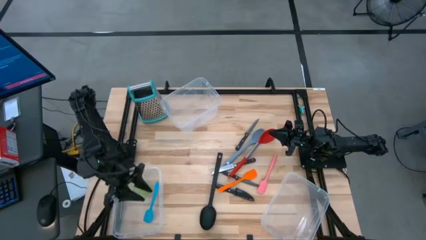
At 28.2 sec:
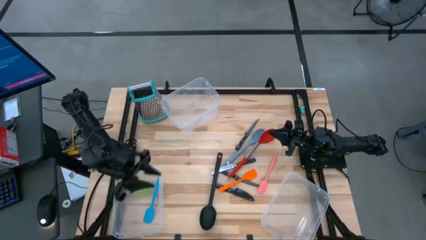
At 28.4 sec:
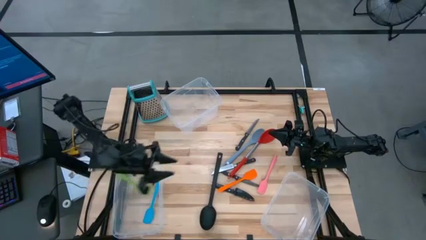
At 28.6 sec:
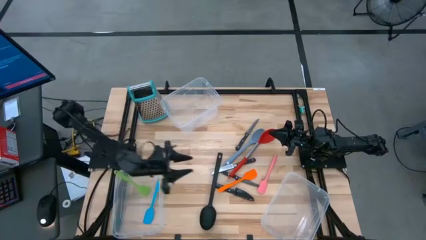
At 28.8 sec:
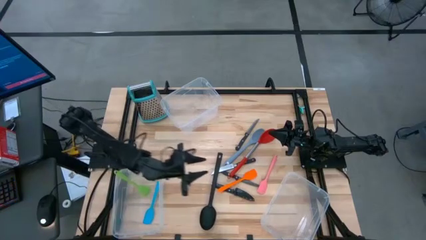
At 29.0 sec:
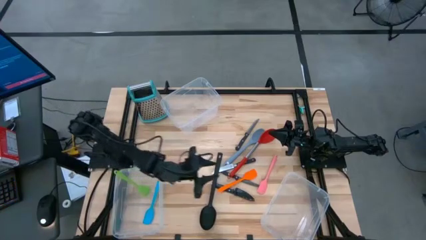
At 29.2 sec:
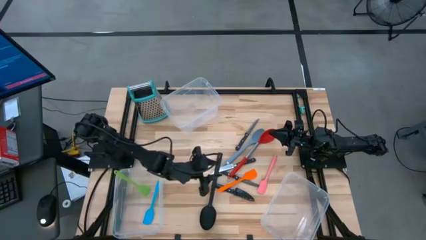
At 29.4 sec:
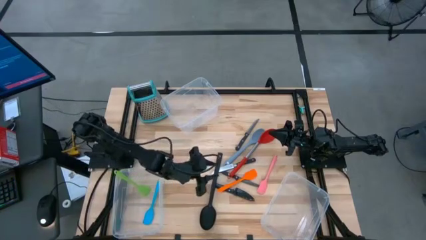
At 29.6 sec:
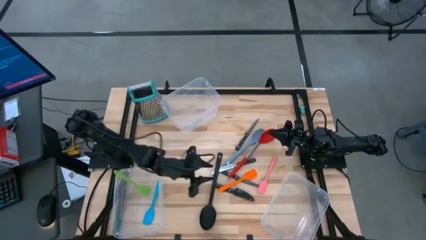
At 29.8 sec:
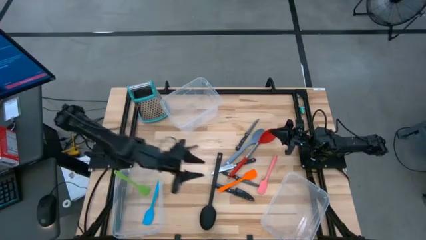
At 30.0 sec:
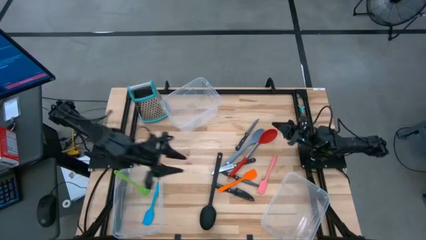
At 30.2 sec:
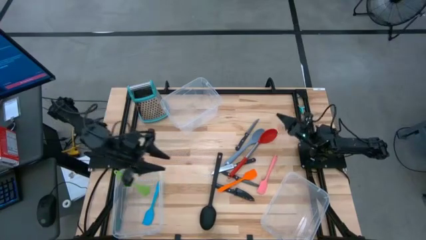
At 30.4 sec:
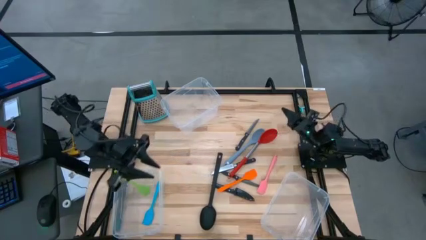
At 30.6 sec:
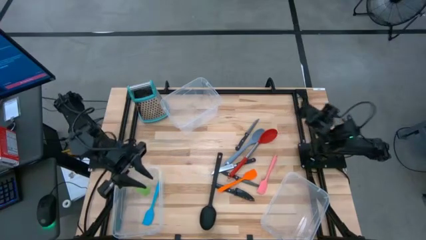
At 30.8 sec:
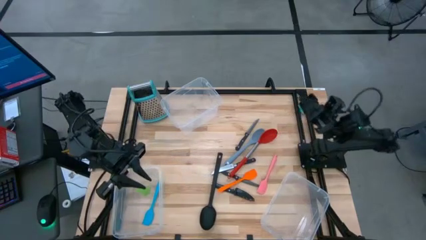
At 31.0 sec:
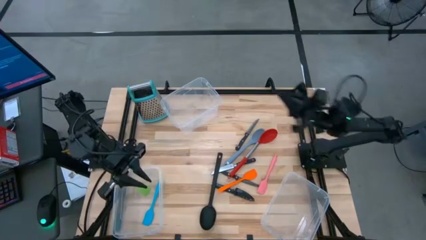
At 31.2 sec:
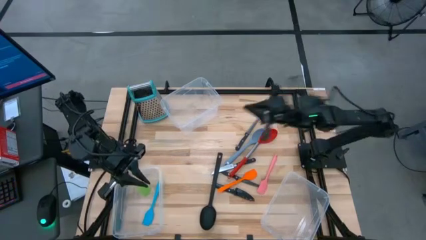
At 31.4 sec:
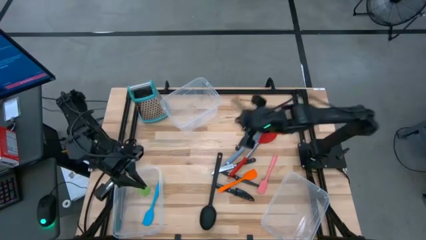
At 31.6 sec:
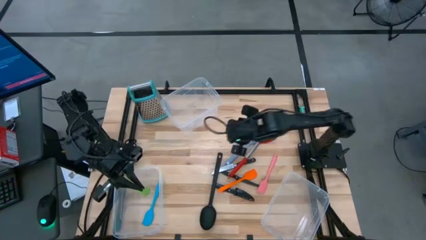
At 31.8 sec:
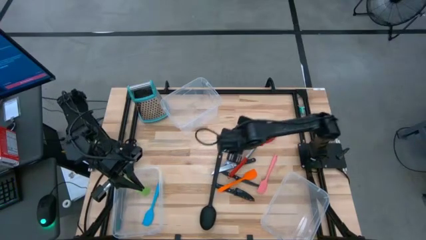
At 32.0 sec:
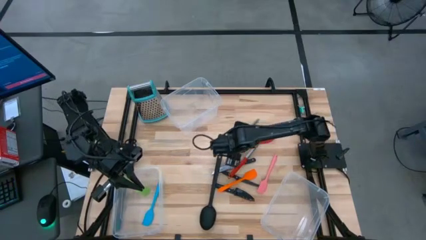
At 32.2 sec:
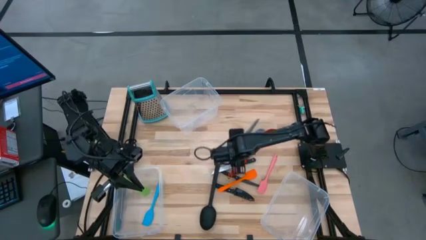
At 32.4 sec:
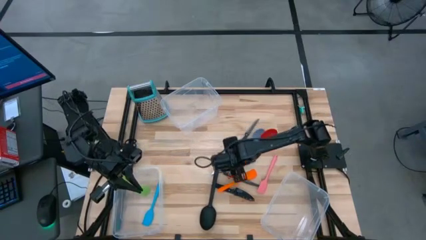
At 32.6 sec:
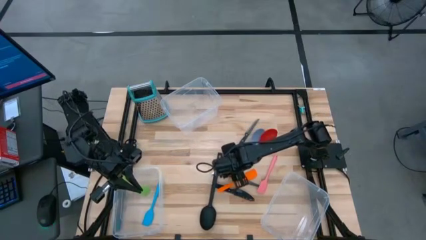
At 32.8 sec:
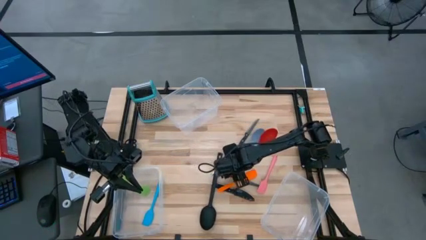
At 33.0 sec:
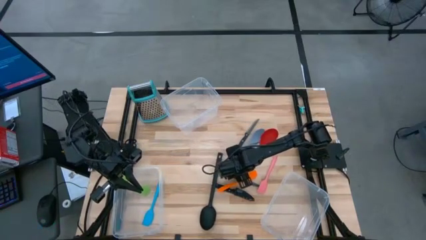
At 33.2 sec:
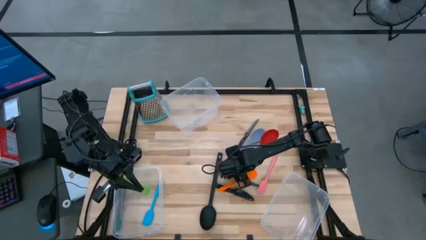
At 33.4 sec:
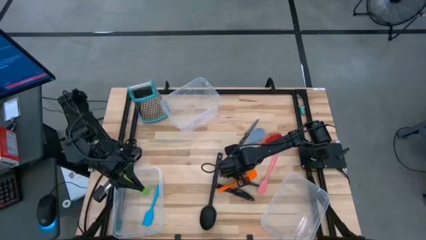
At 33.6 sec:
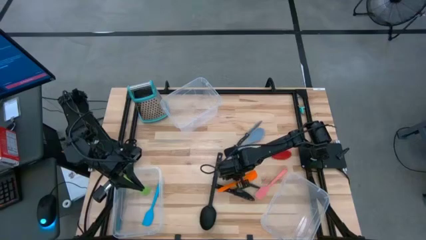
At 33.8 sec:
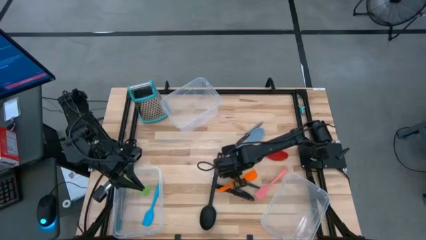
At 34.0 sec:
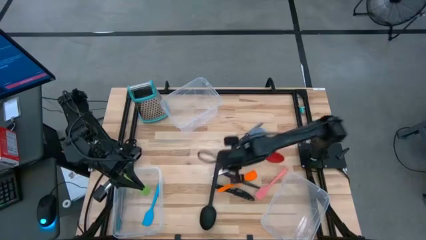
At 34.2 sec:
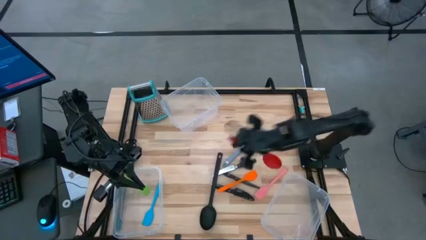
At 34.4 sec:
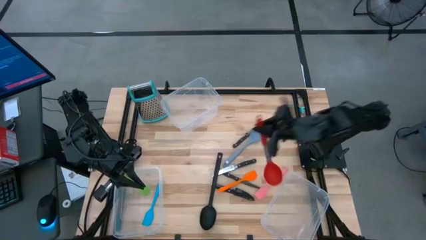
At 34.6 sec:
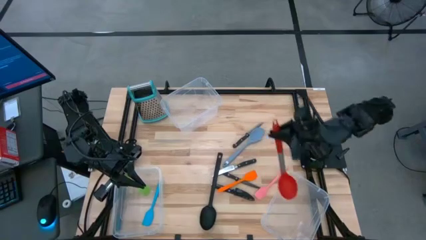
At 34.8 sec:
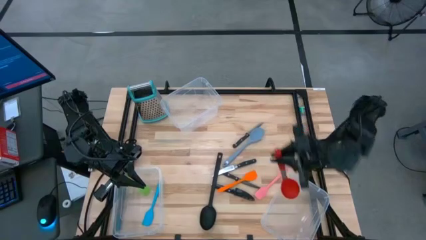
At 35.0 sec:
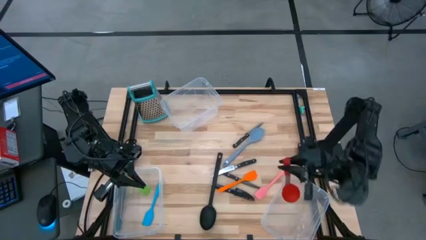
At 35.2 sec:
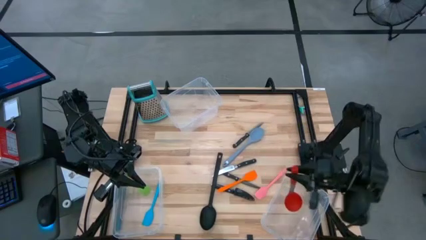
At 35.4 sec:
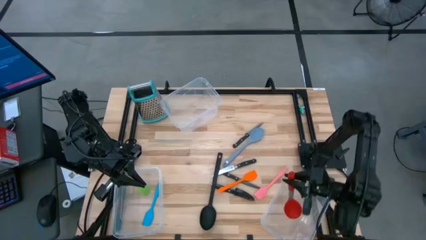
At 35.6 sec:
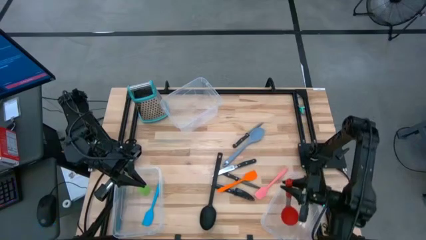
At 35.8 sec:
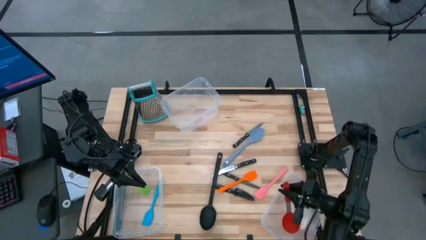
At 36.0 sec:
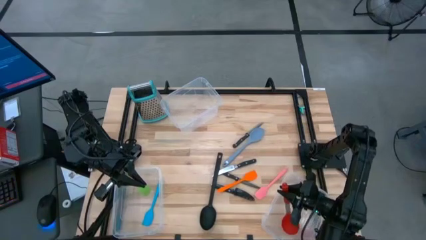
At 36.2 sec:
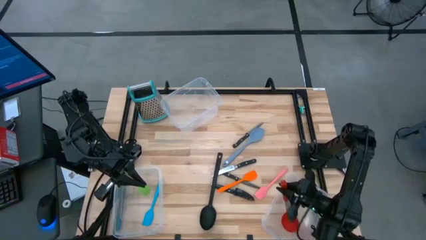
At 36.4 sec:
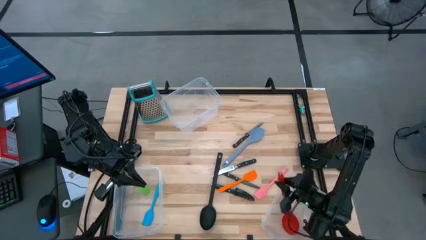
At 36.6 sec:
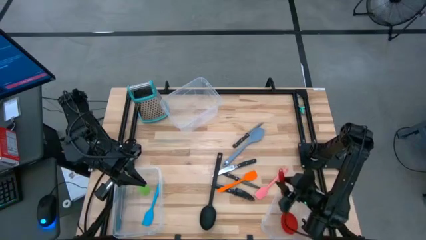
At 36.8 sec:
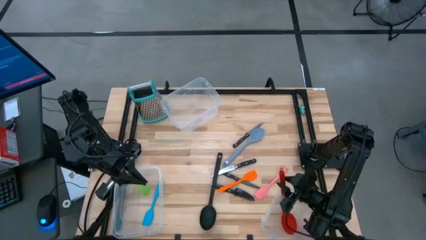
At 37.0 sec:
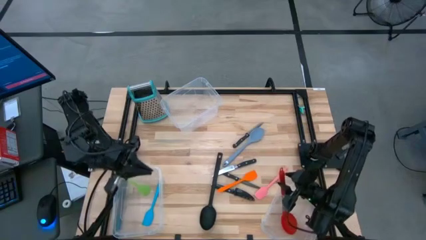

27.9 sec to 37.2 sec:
Task: Pick & Place Kitchen Items
Put the red serving spoon into the bottom right transparent bin

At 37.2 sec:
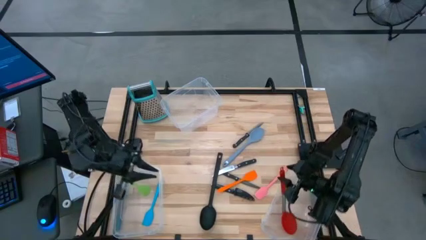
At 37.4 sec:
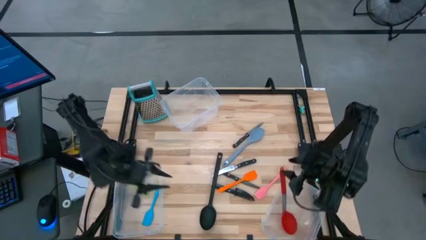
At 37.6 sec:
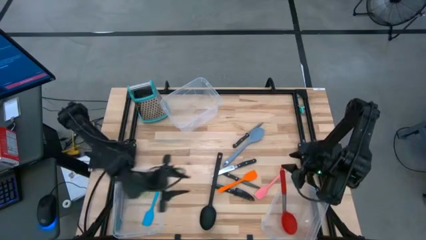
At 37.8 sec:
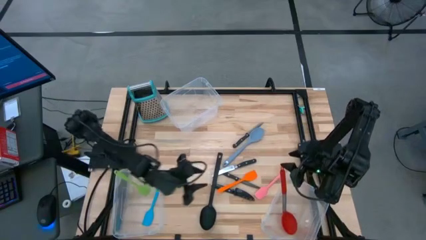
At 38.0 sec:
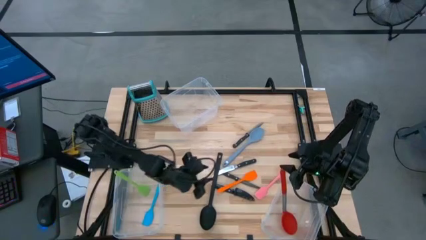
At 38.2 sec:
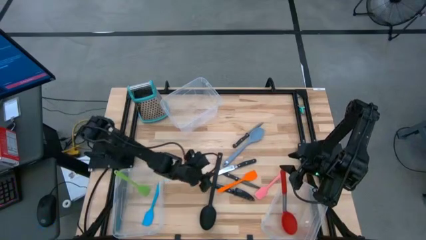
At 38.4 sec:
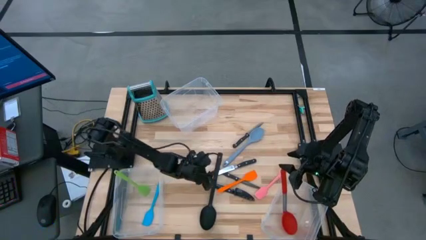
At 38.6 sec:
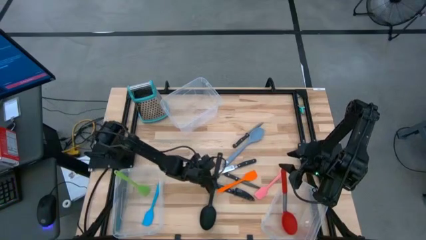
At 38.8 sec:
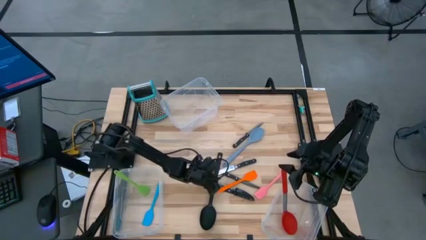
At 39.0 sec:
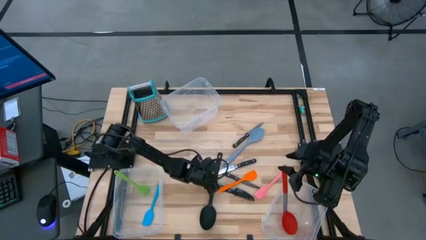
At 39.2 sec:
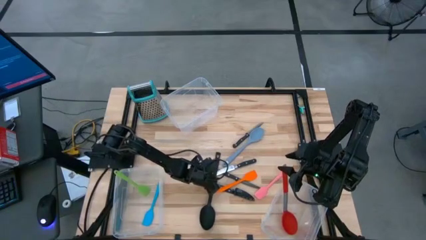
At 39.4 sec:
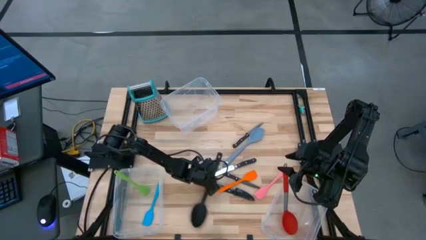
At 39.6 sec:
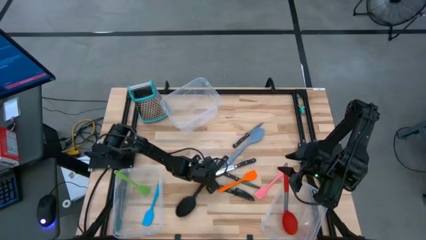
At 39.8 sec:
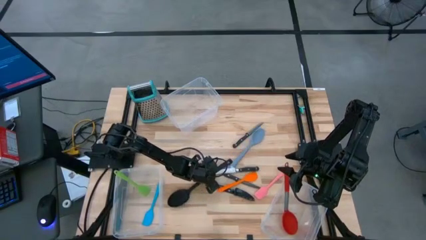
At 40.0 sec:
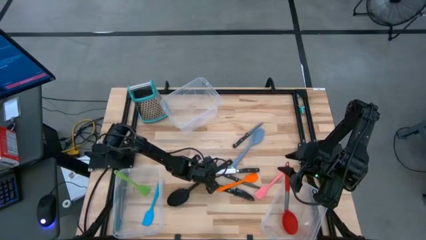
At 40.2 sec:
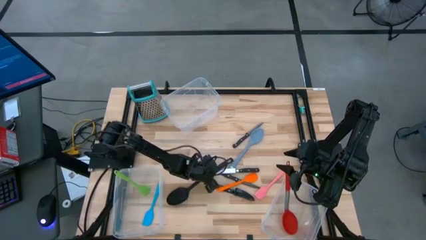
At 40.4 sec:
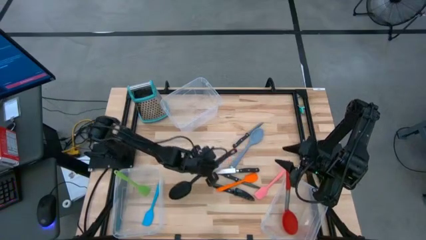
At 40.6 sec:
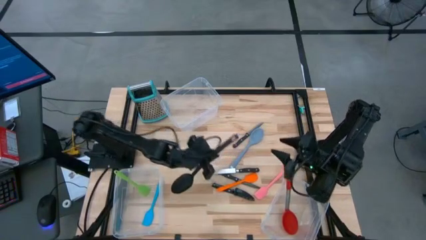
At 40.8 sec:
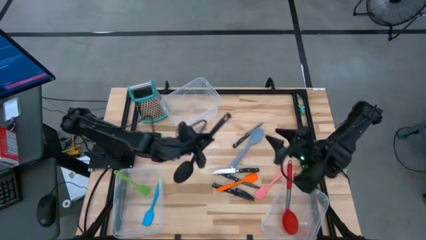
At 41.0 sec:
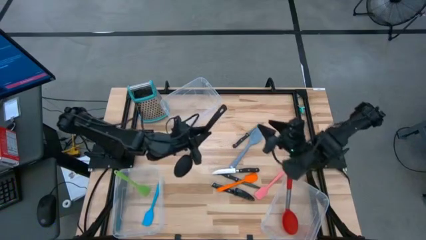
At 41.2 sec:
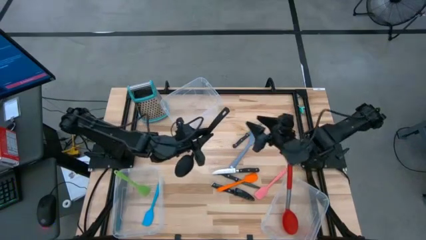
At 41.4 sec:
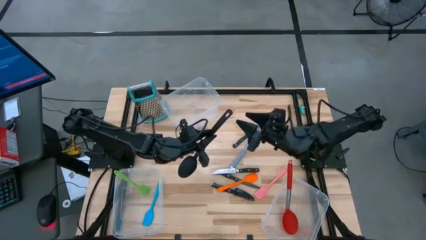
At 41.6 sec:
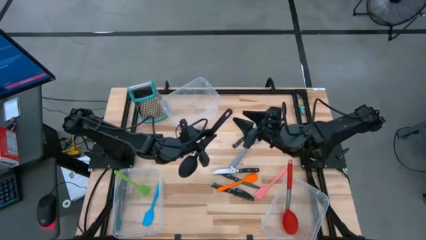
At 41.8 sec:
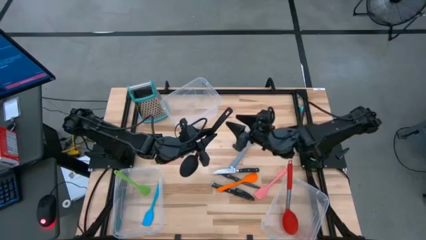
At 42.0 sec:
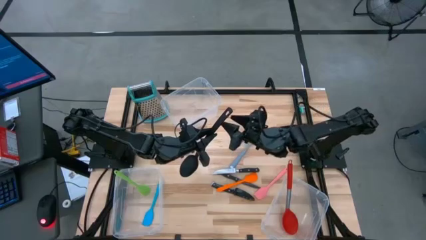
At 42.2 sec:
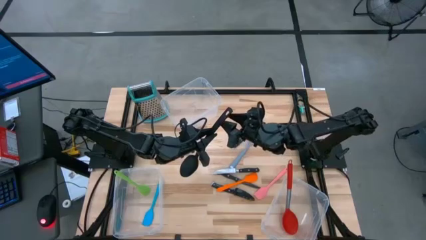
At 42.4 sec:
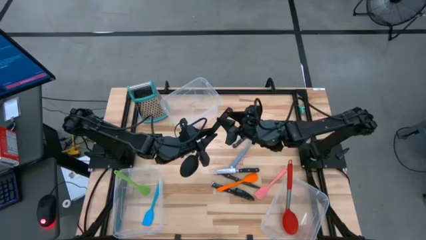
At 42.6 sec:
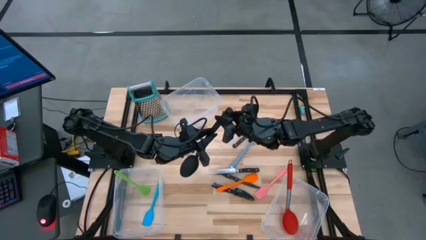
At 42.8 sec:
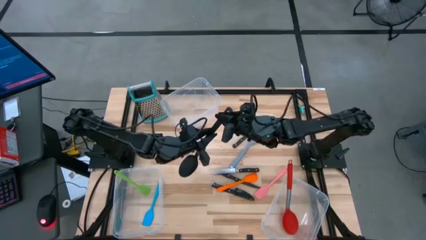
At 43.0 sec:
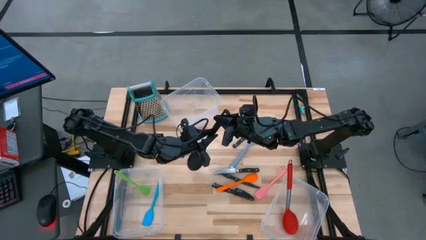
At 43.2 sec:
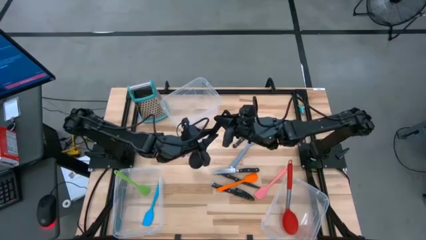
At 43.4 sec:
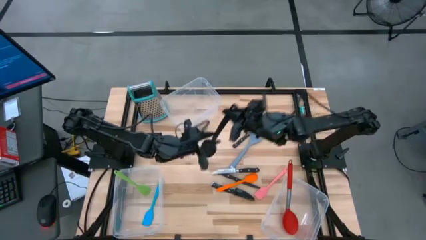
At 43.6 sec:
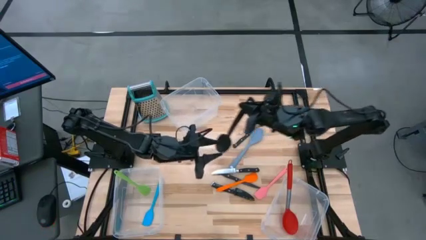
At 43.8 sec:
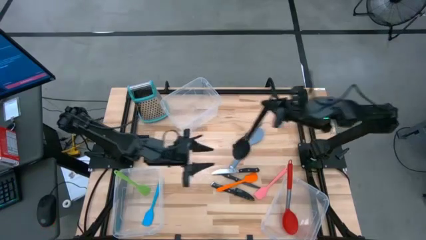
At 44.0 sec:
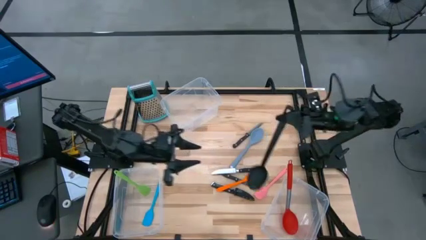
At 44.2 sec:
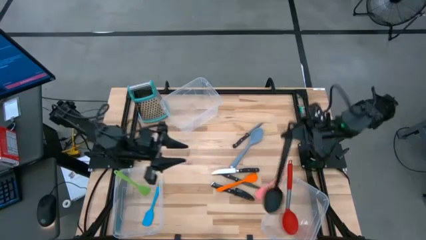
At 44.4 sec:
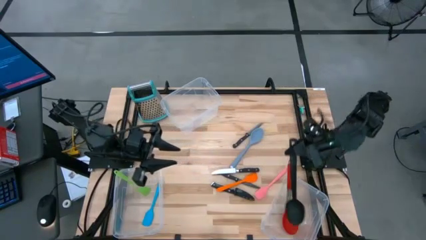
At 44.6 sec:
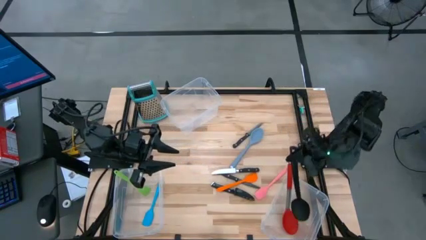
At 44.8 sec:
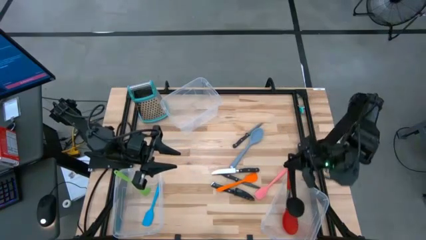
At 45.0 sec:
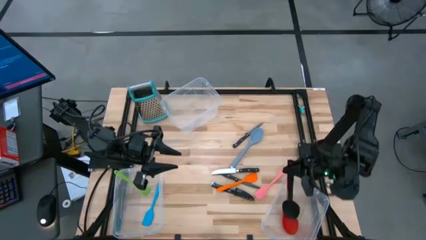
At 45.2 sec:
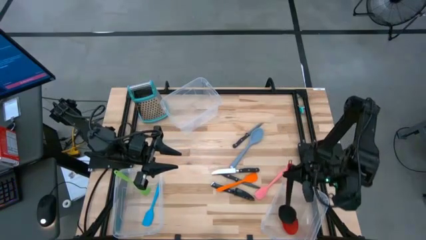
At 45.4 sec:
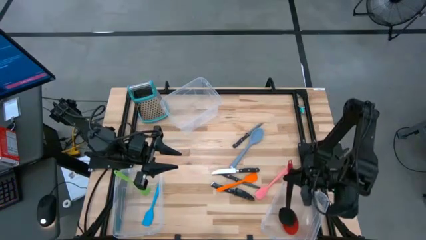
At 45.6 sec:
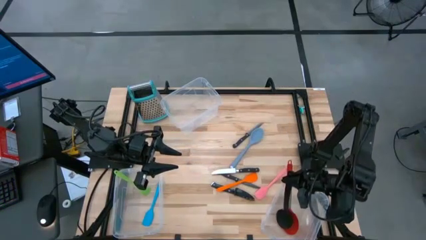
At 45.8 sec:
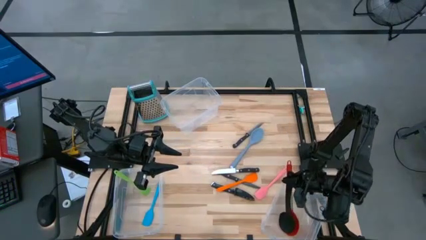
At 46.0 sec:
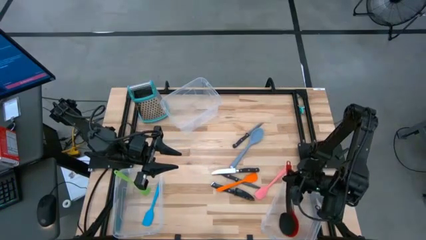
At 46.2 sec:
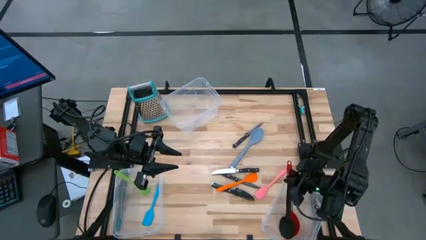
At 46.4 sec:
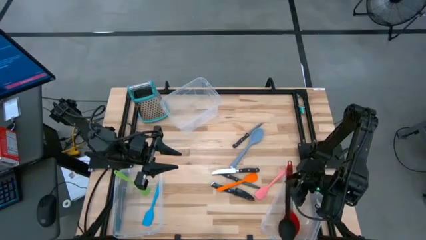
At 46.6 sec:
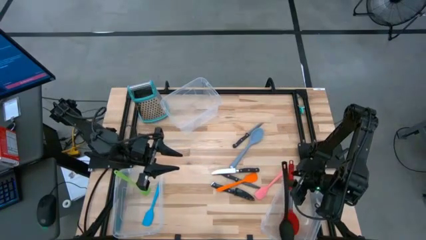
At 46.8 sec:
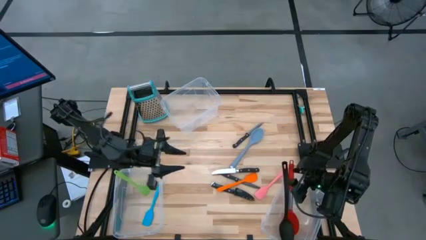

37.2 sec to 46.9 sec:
Put the black serving spoon into the bottom right transparent bin
